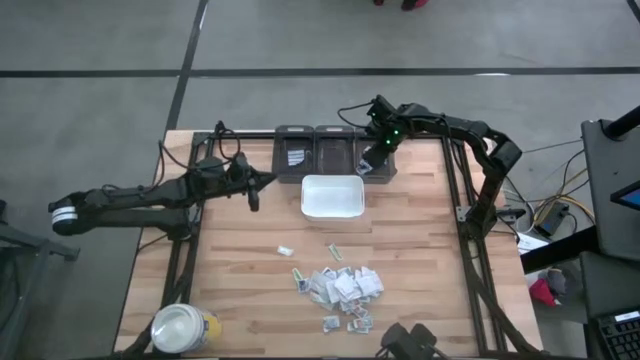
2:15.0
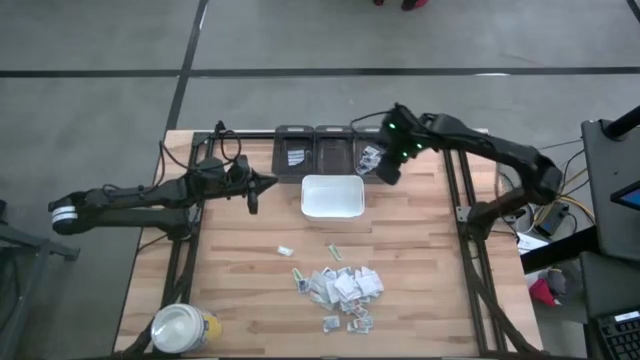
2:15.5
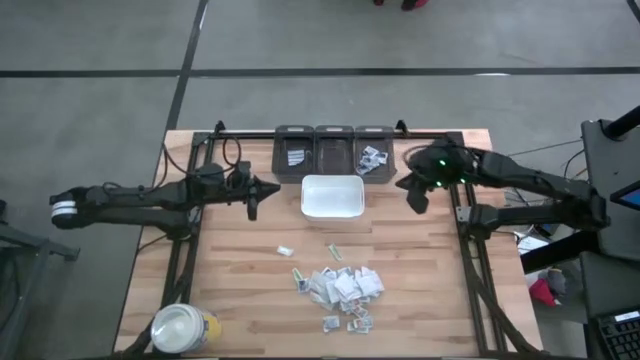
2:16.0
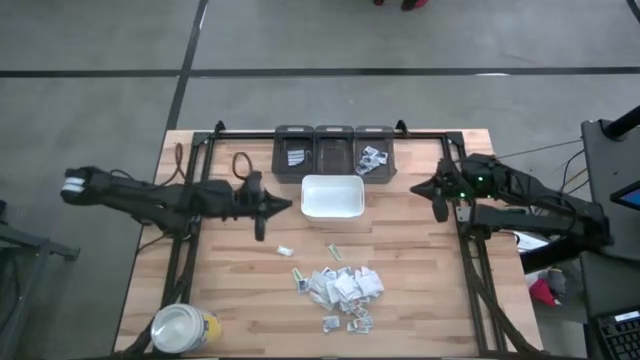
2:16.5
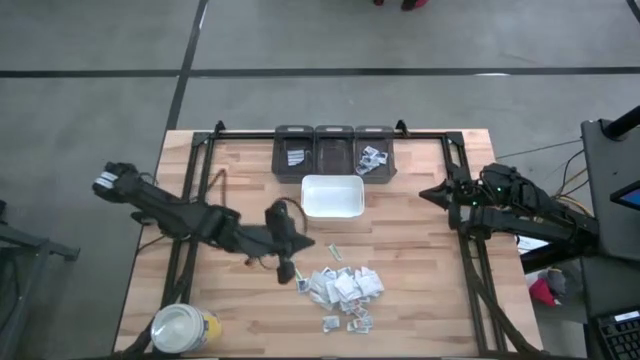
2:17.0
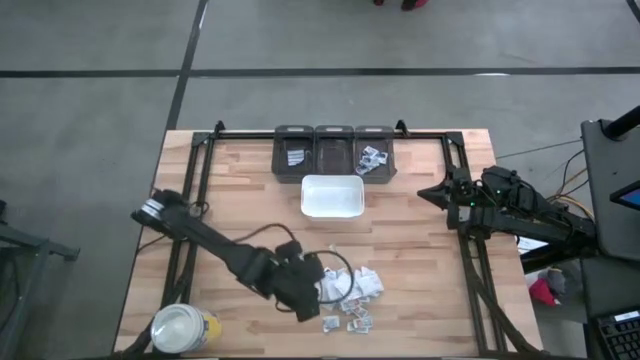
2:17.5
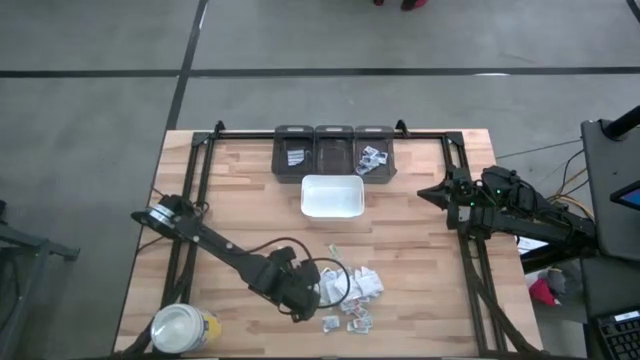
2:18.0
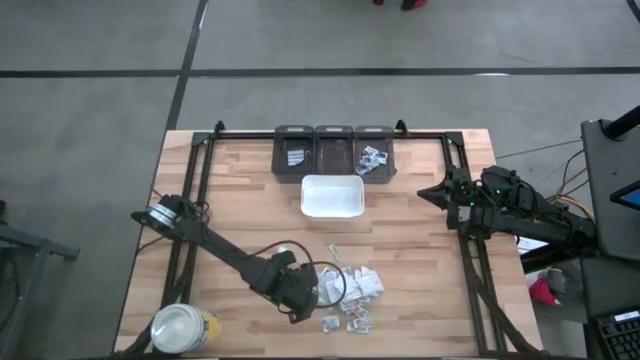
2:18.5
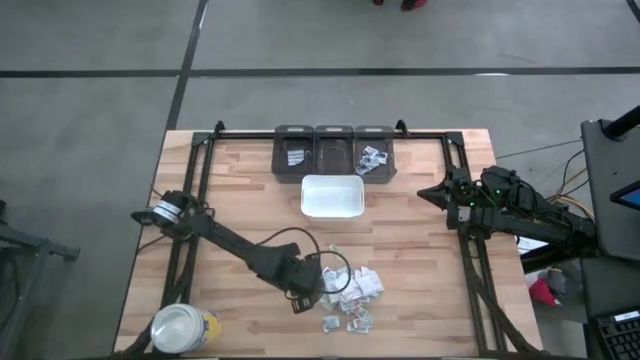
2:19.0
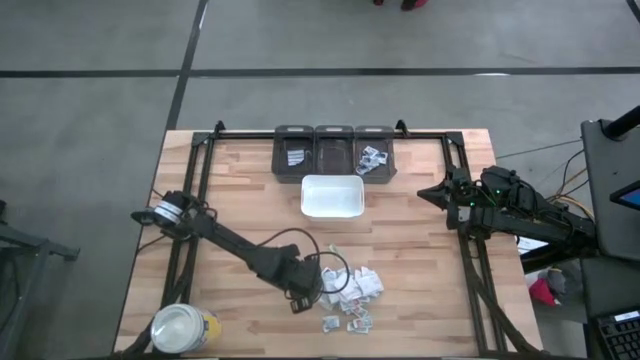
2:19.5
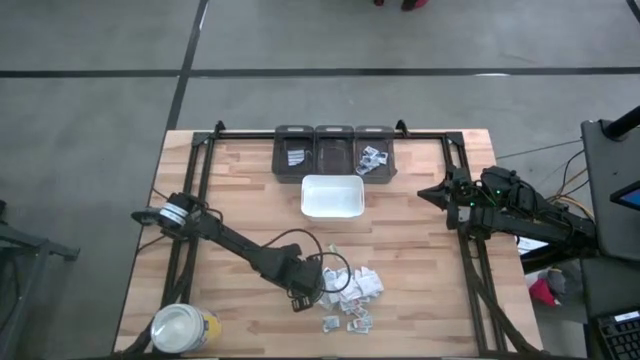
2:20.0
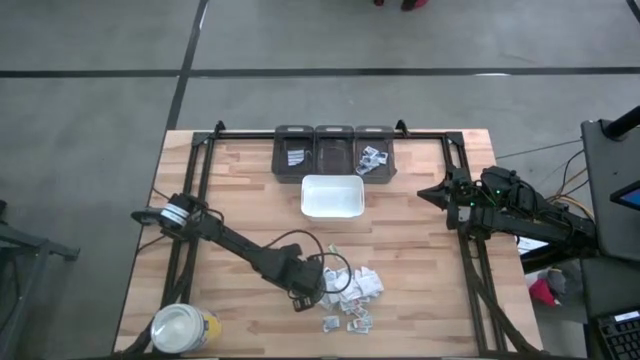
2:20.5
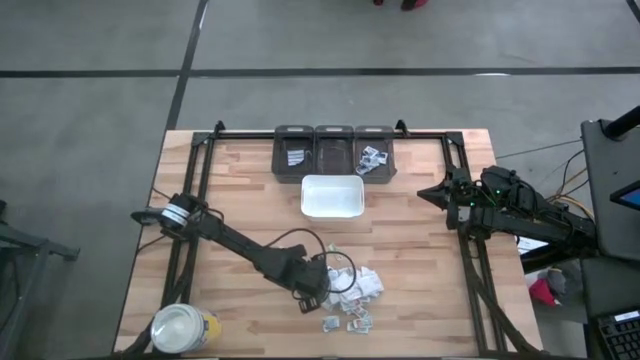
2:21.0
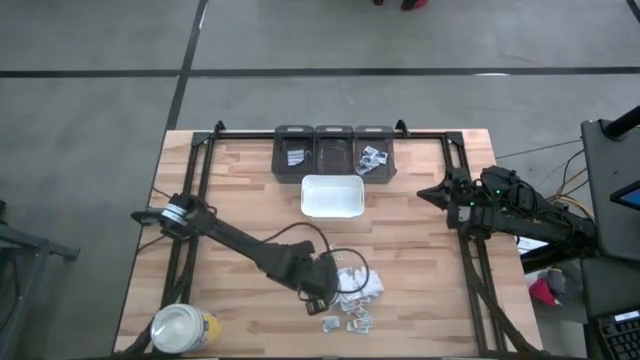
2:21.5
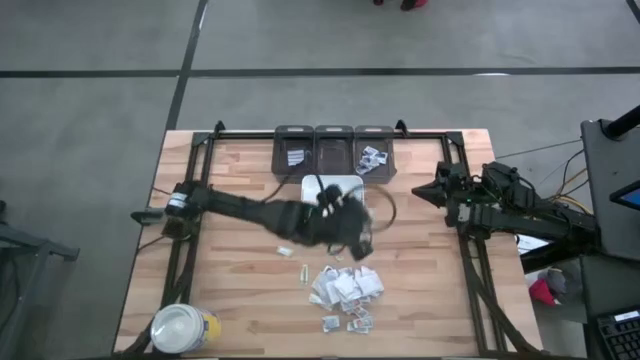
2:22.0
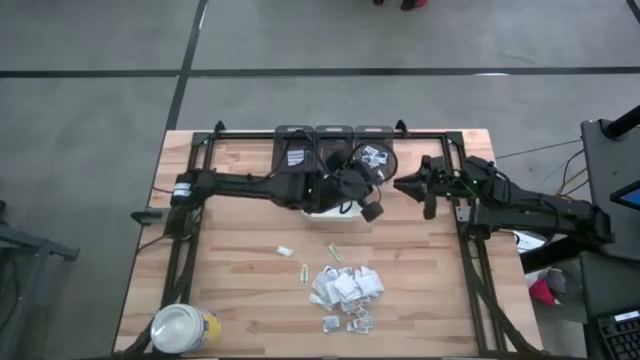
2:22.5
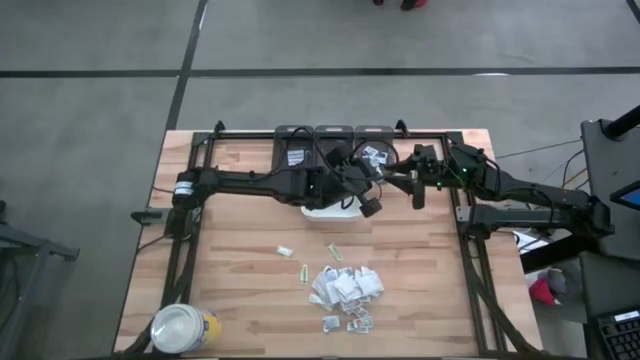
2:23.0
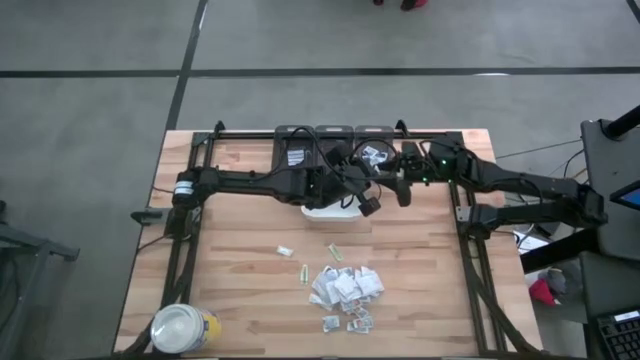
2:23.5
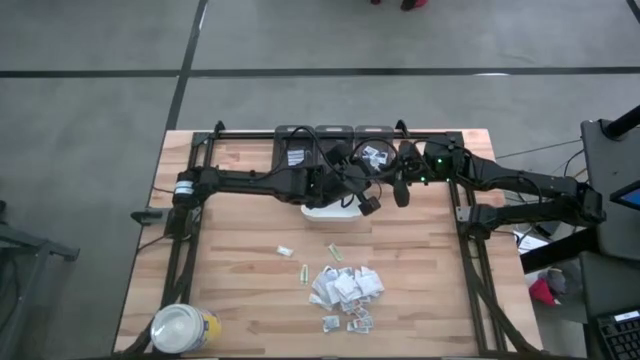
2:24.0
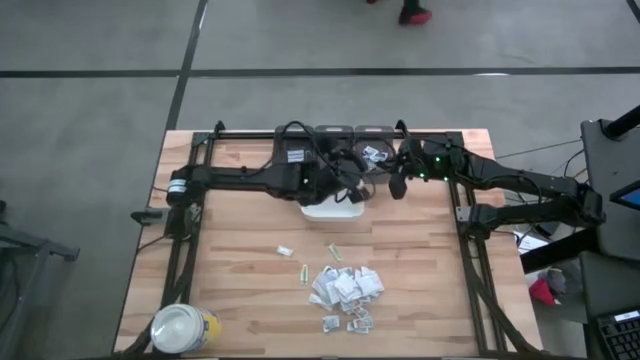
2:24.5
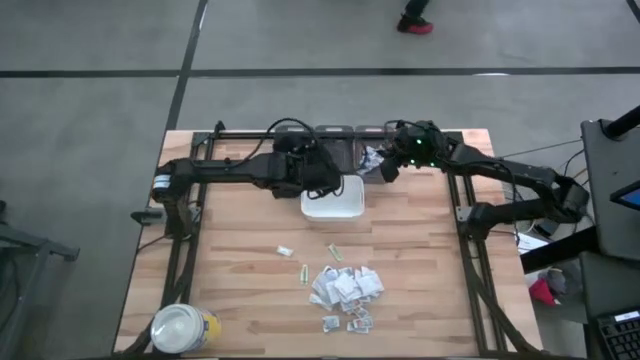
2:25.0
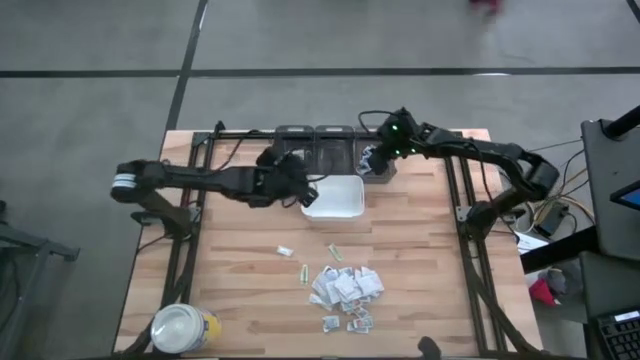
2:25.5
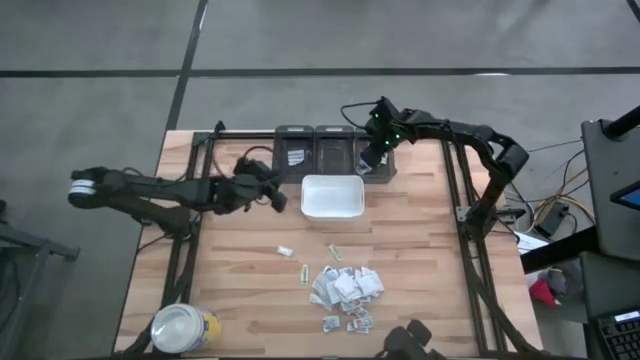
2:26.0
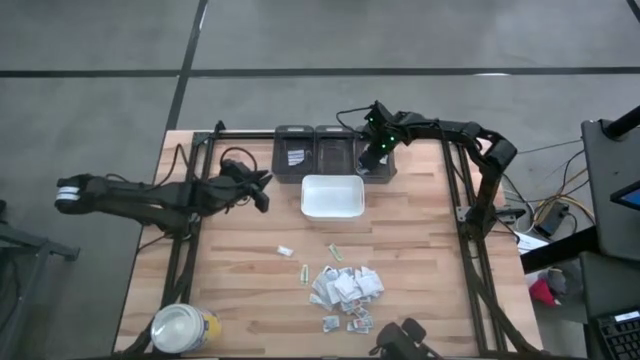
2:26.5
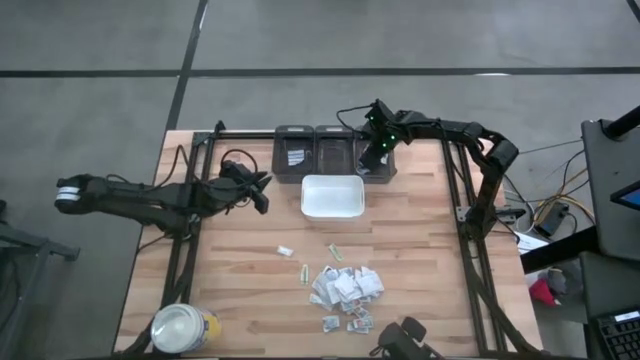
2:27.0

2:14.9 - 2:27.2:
Task: Pick & Place First Aid Supplies
Put the white alcohol pad into the right black bin

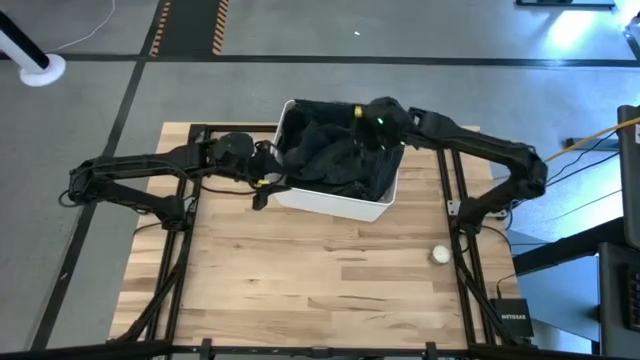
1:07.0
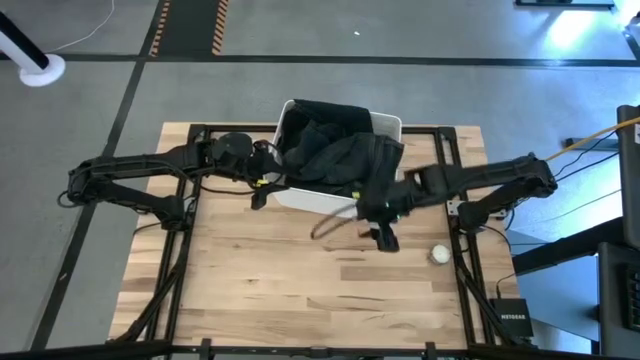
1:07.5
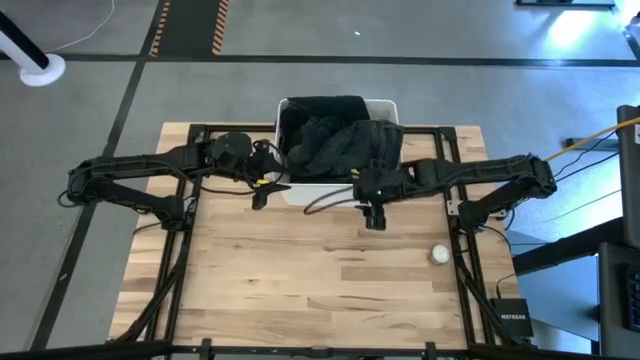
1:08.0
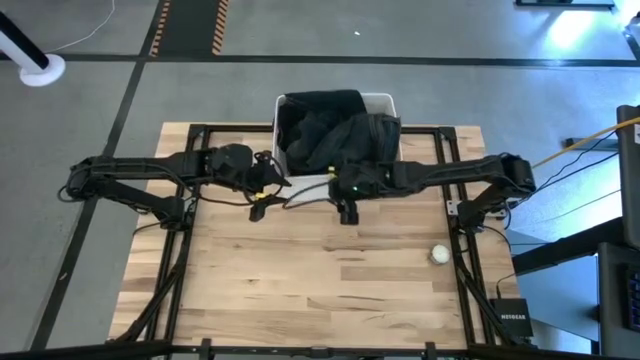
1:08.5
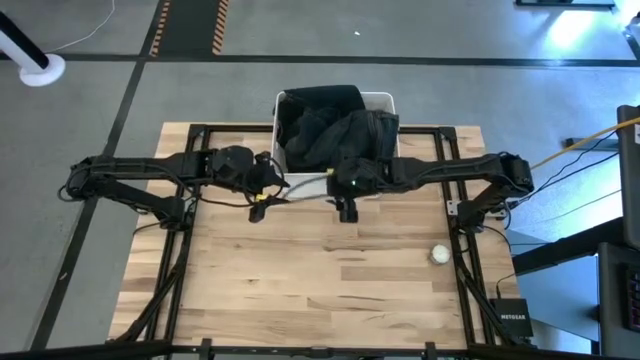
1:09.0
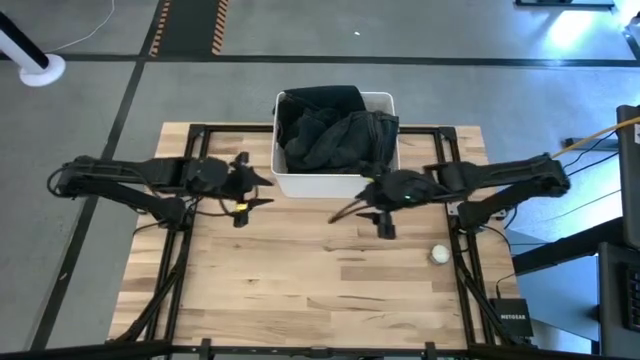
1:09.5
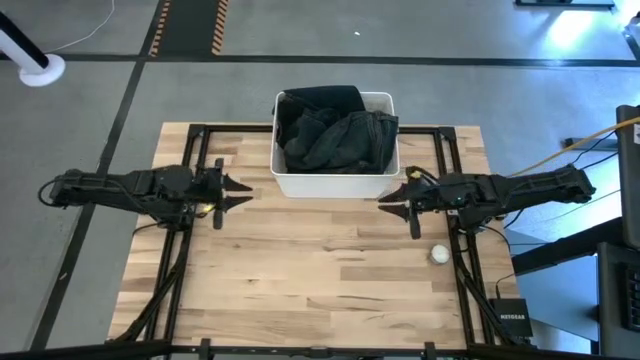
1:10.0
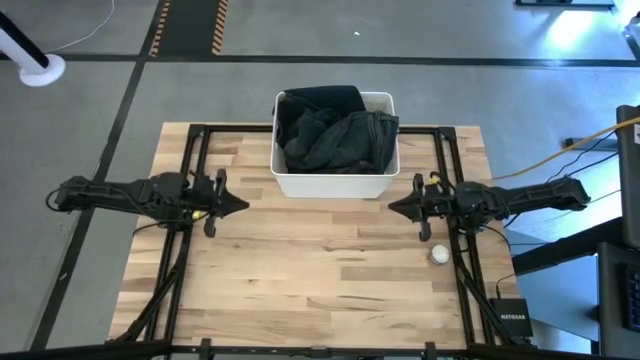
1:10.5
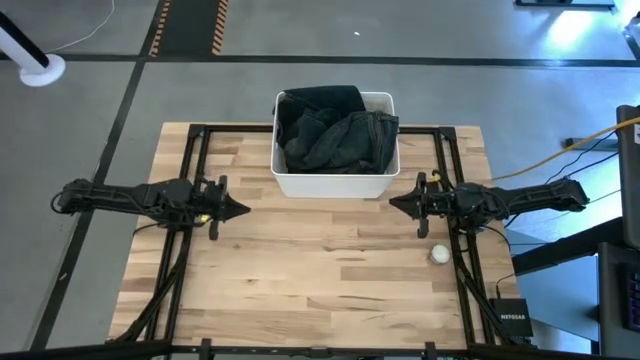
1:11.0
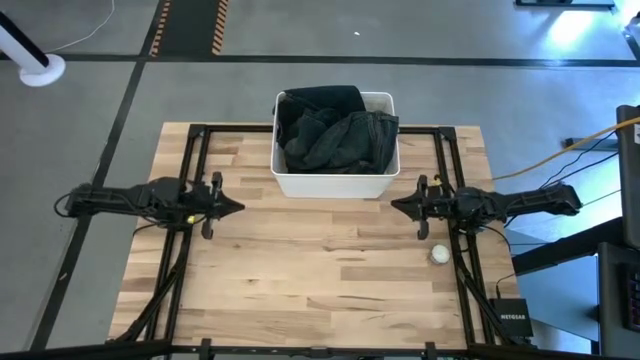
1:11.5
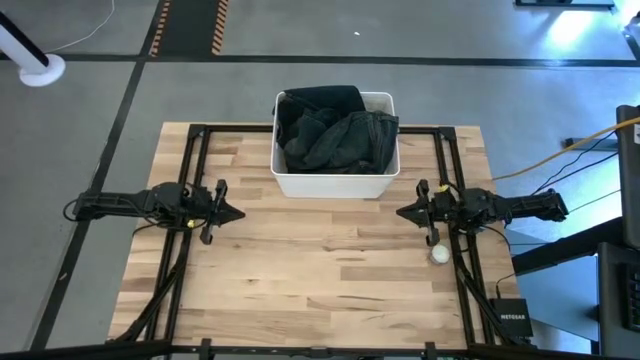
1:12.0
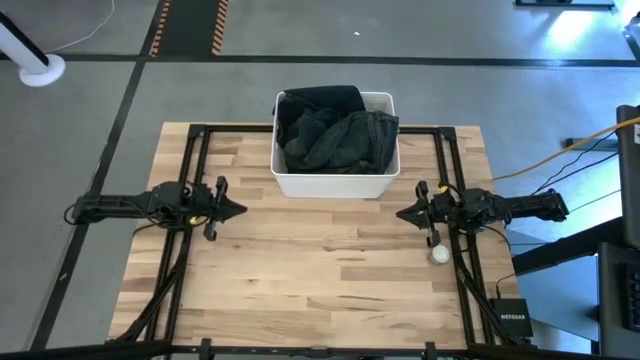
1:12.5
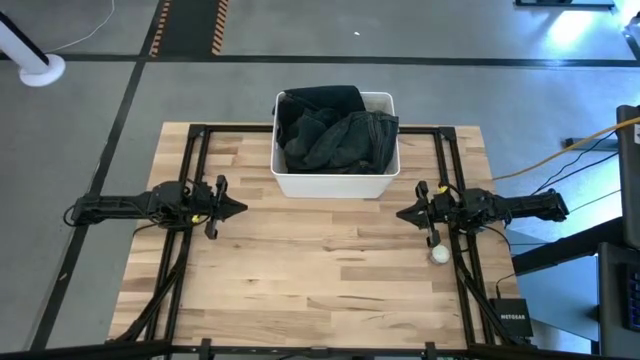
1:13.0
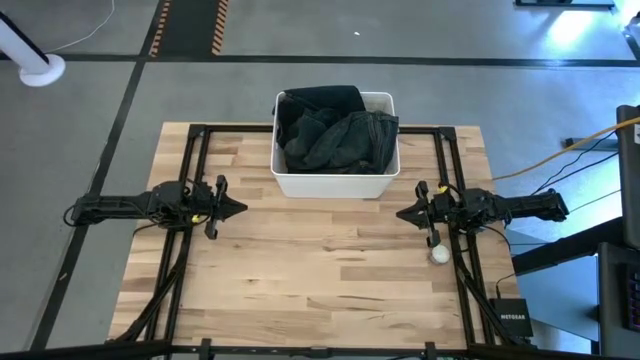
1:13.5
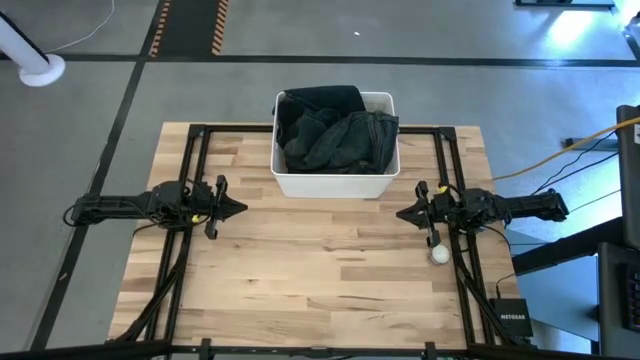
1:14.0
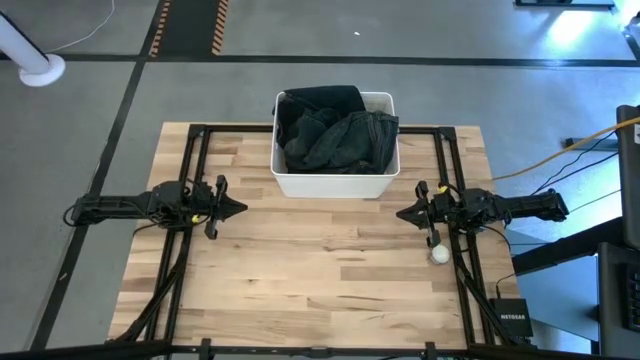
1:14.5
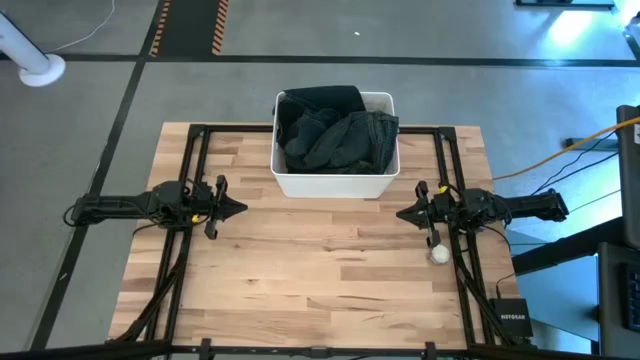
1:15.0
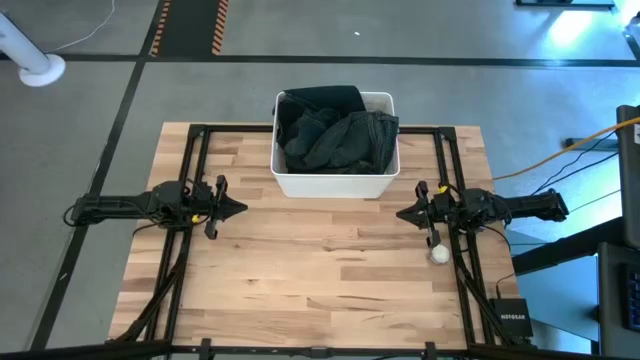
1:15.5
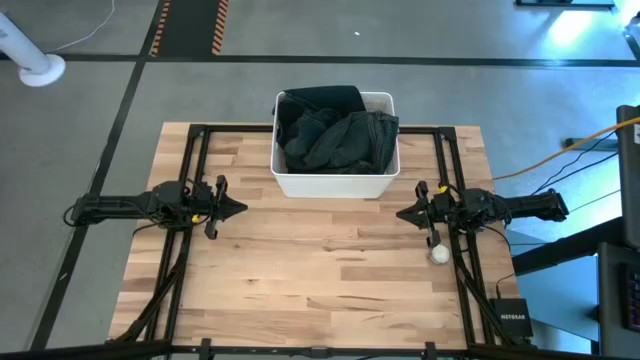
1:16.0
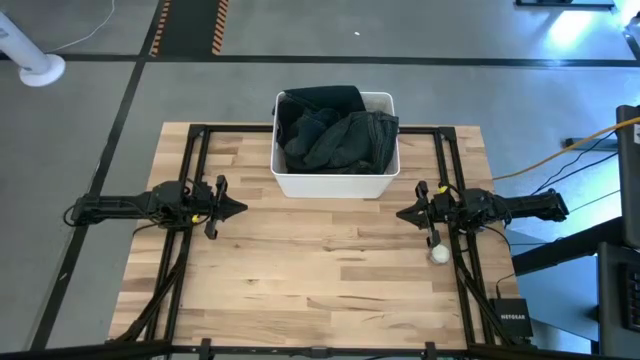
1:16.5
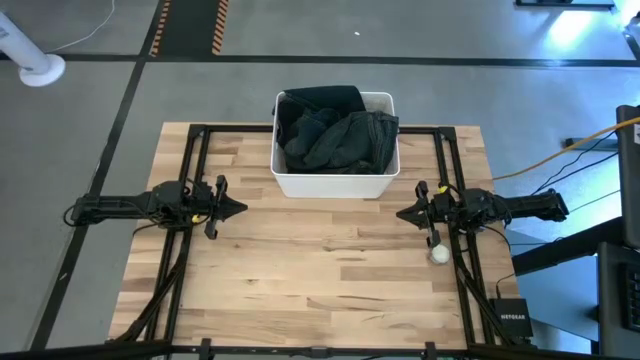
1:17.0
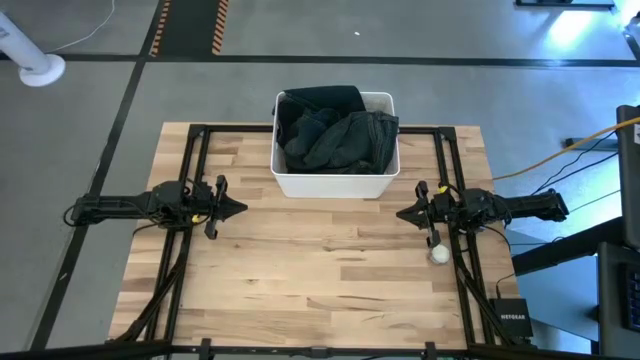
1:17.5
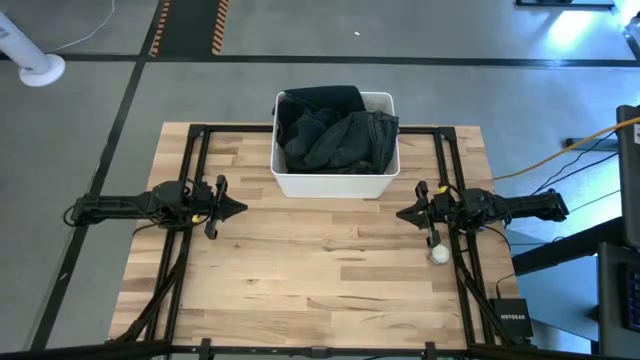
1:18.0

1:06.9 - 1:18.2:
Task: Sort clothes
Move the white bin to the top center of the table
